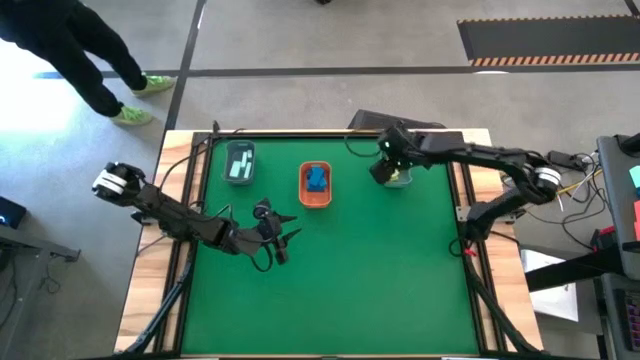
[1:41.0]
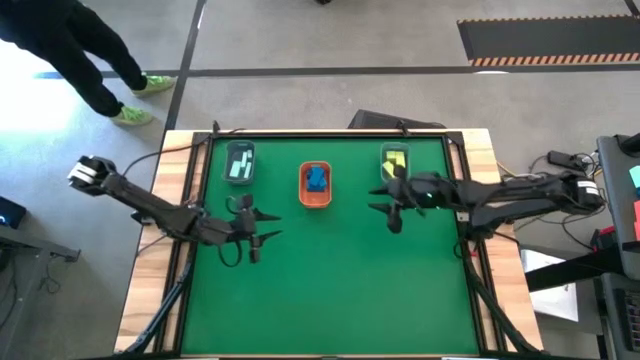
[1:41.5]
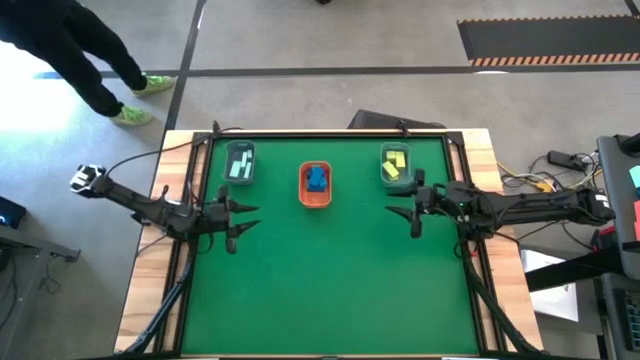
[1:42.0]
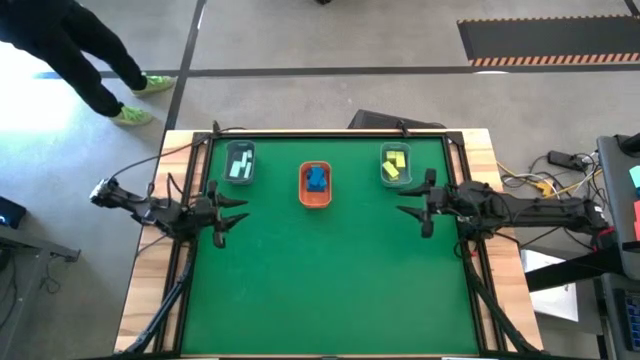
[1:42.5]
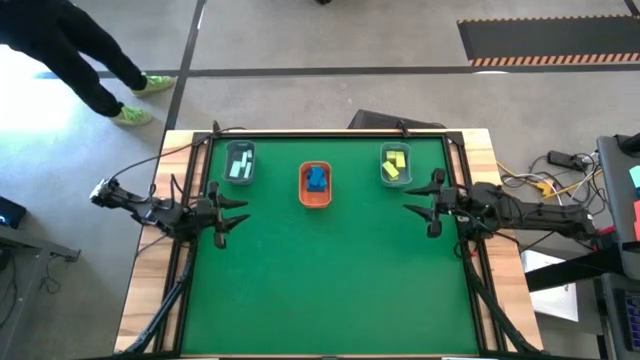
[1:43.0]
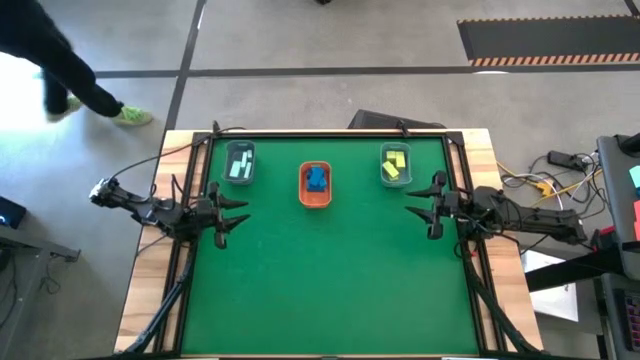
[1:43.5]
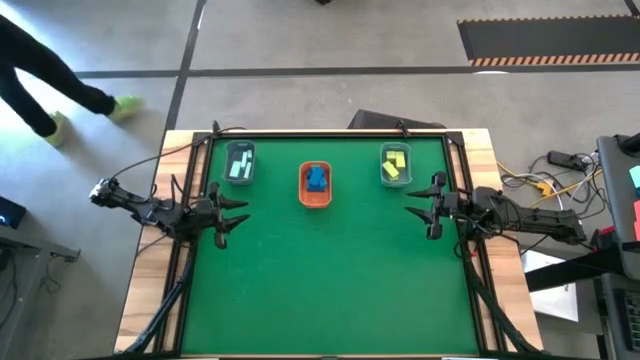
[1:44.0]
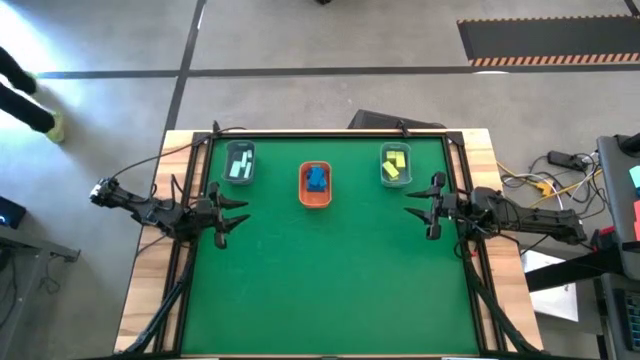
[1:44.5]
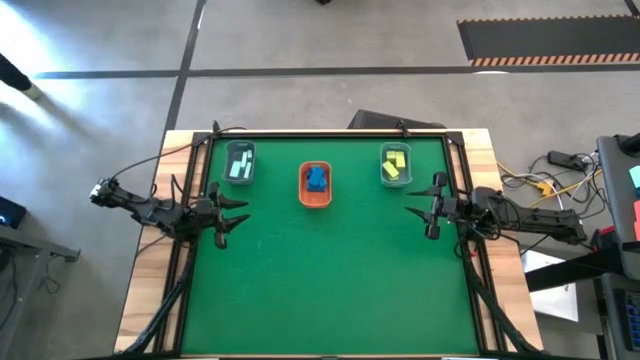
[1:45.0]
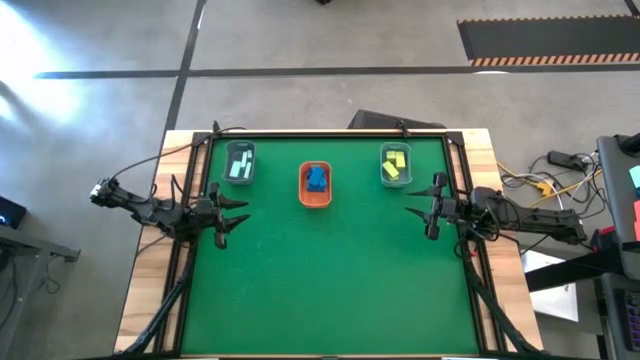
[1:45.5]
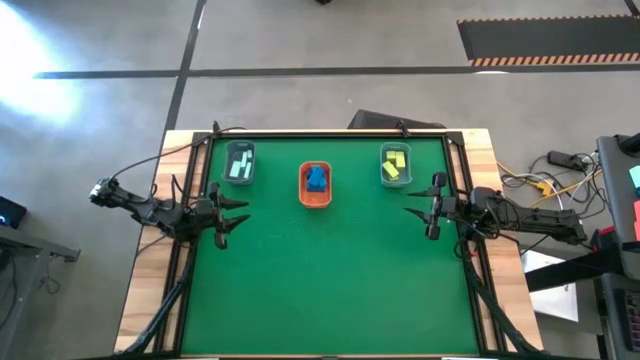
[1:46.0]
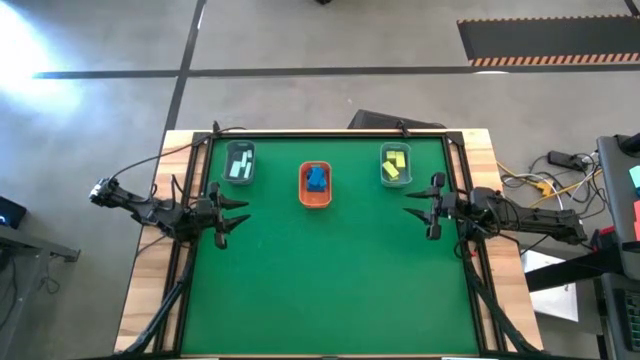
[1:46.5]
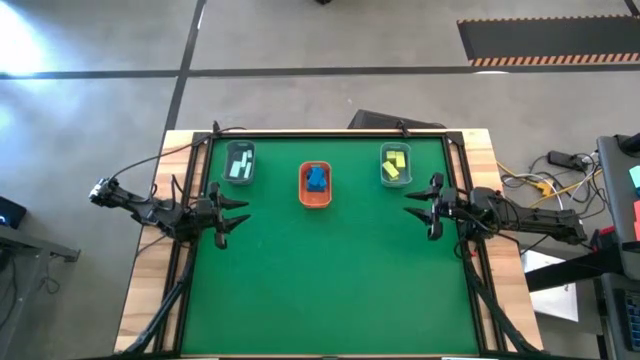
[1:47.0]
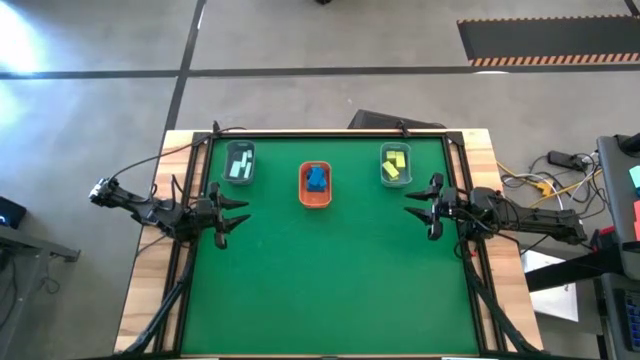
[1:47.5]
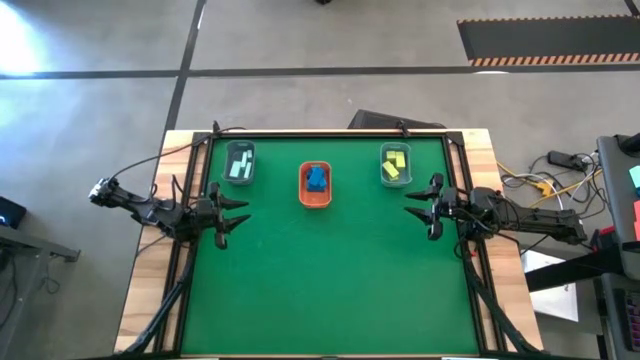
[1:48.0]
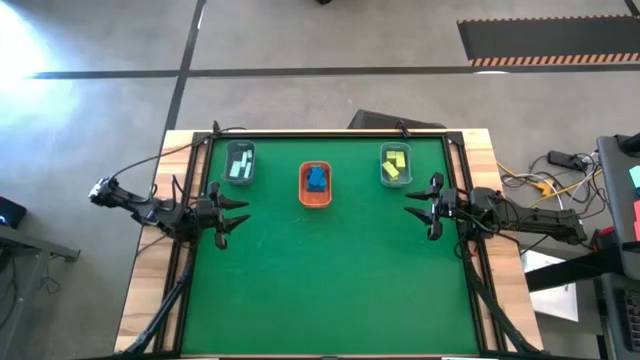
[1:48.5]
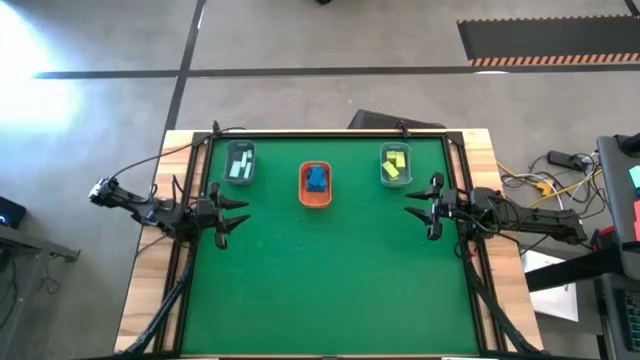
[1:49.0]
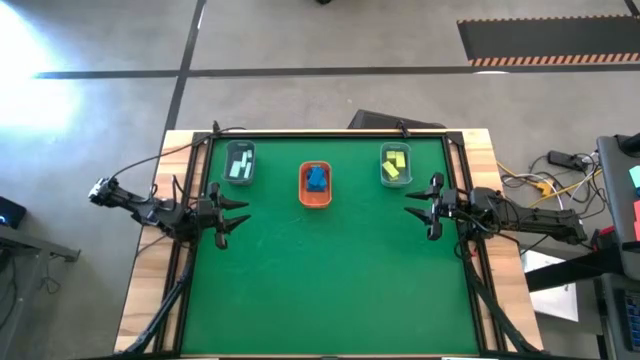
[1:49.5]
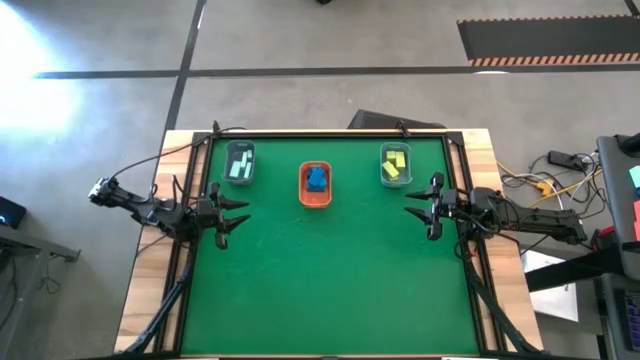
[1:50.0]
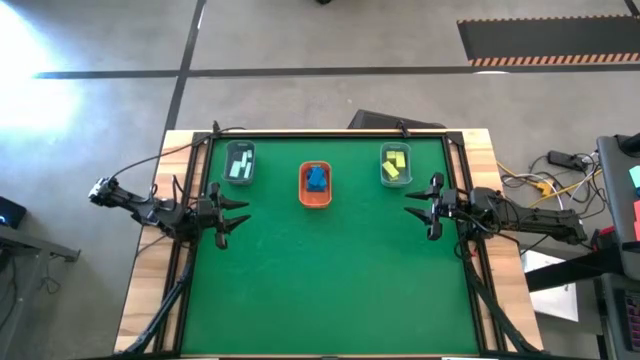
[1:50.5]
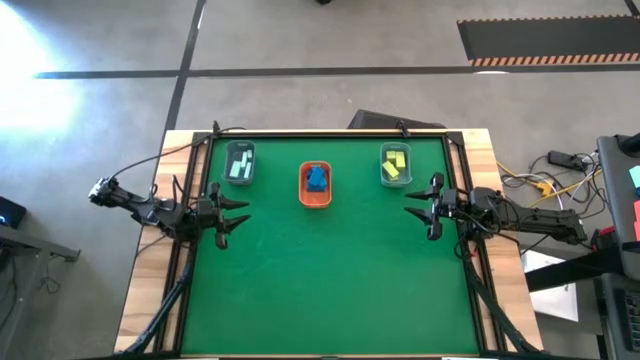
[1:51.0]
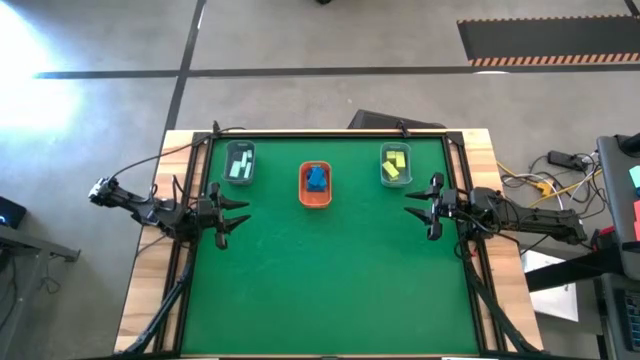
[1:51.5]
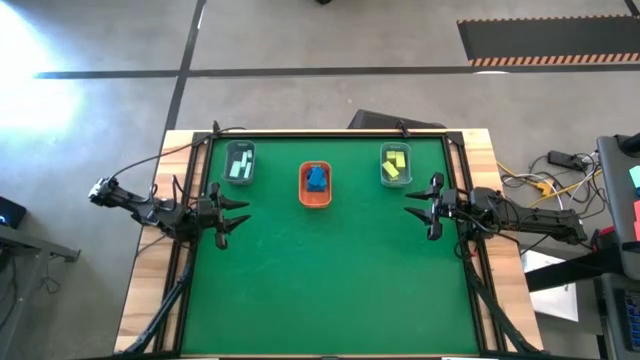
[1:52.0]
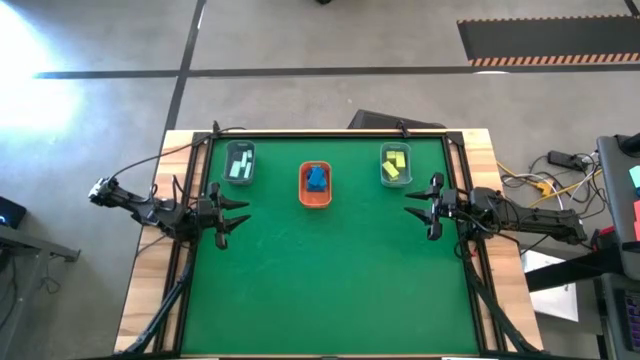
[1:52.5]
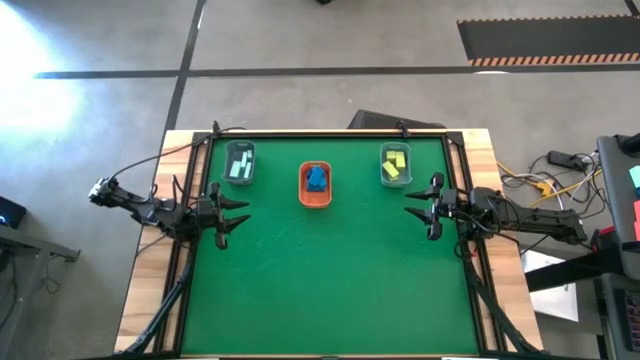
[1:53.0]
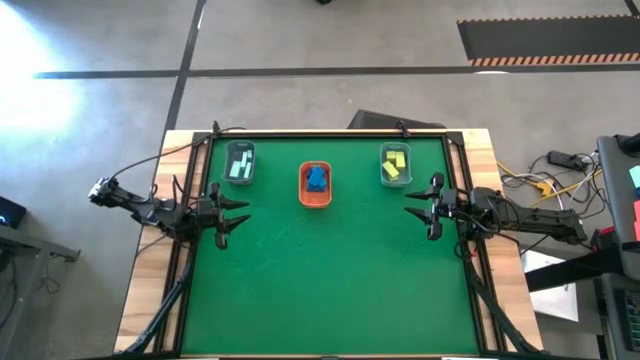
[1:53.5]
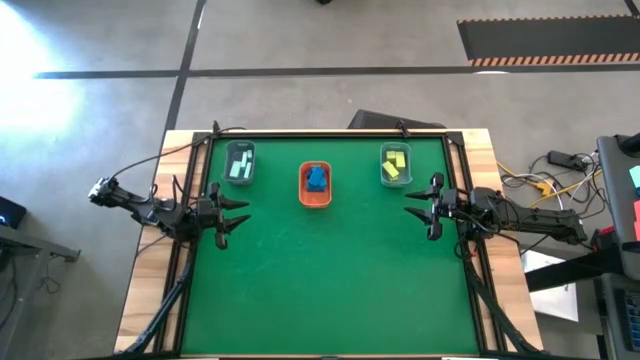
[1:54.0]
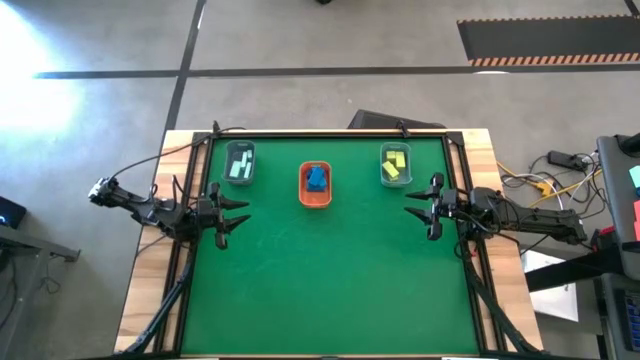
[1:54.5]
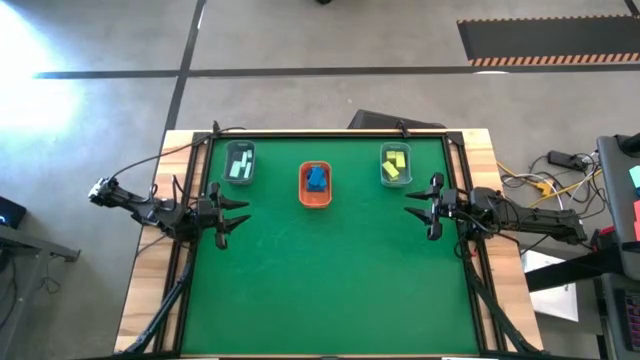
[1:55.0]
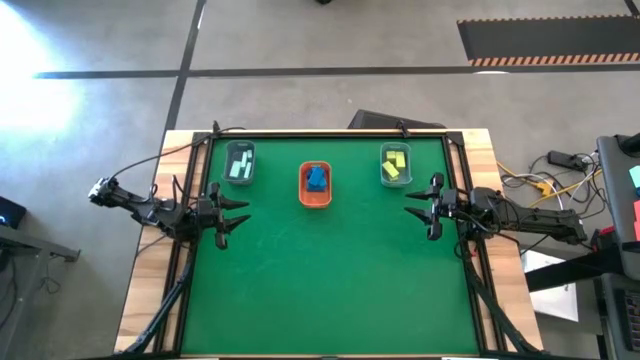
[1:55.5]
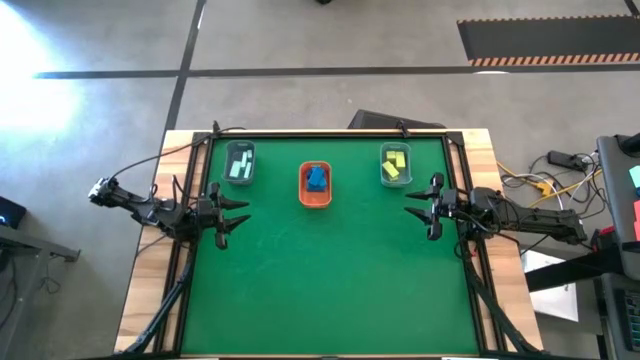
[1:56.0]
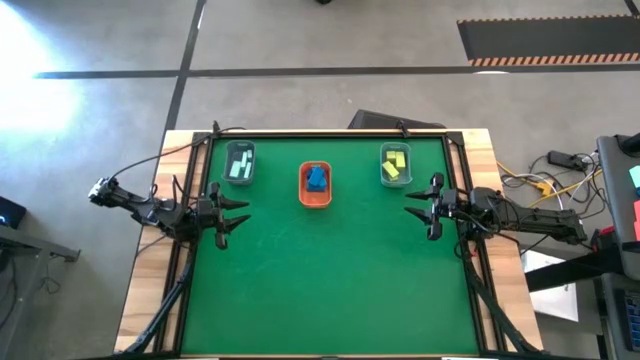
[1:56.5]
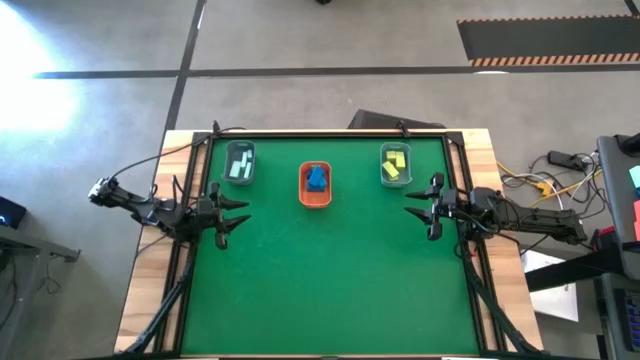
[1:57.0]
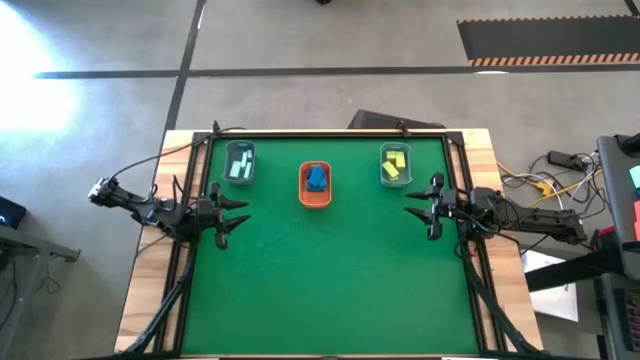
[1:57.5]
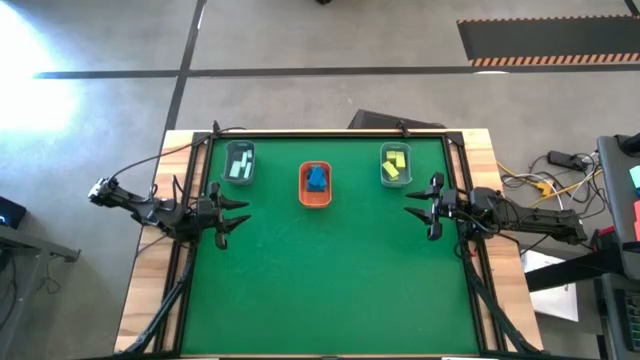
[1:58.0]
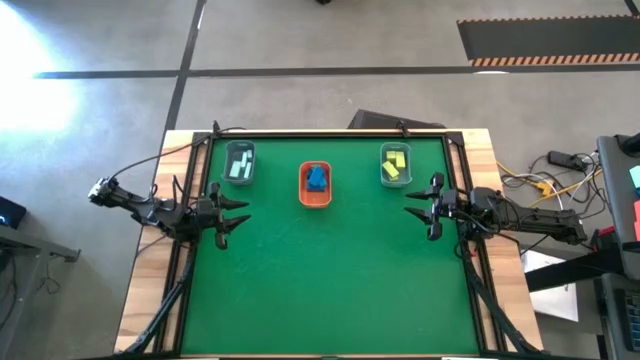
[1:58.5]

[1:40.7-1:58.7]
Task: Sort & place blocks by color
Return to Home Position

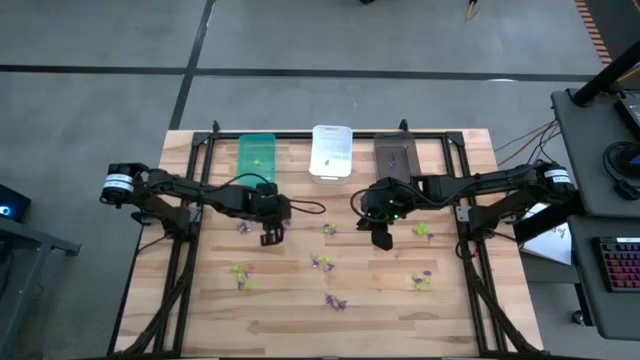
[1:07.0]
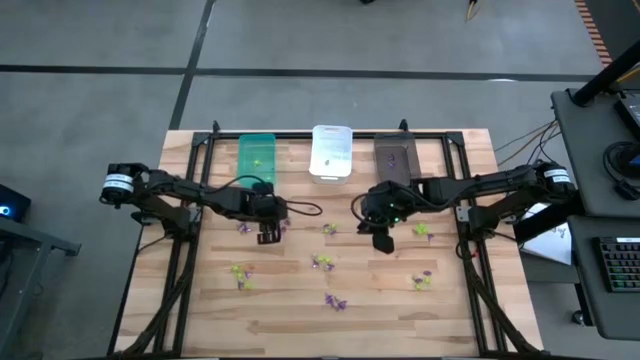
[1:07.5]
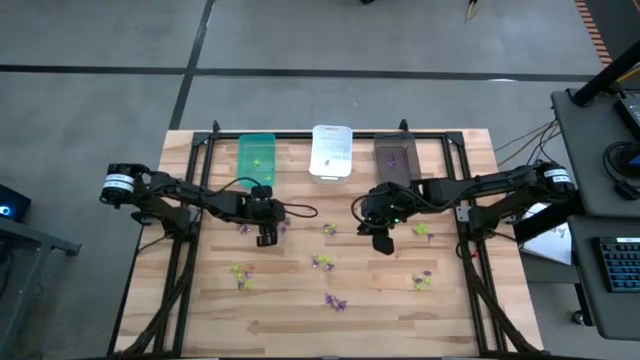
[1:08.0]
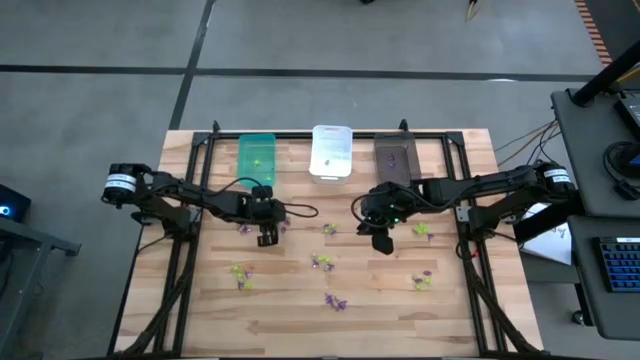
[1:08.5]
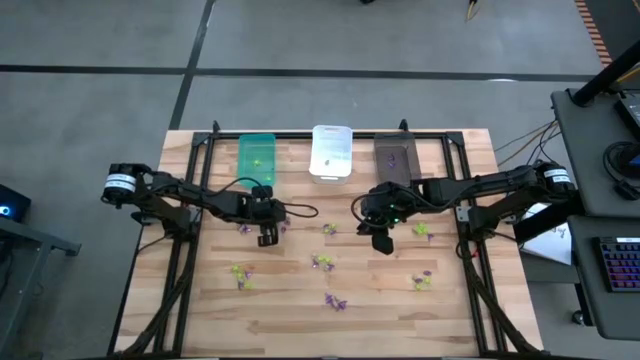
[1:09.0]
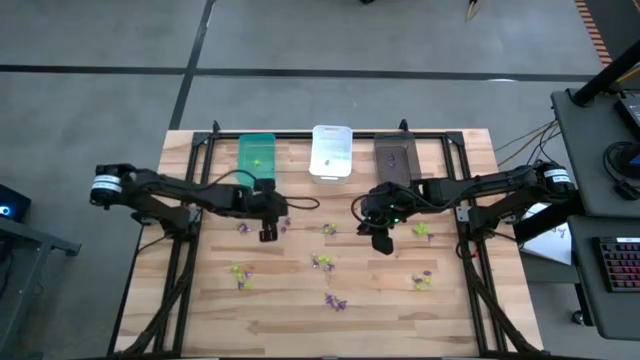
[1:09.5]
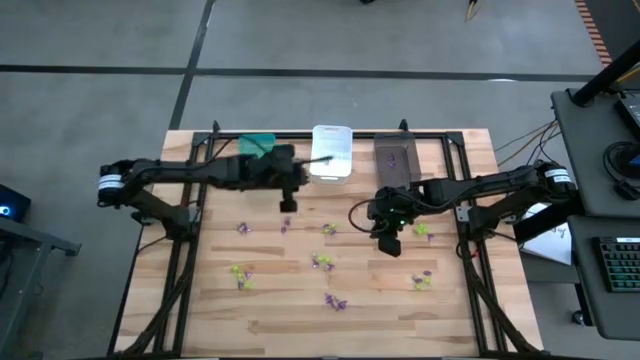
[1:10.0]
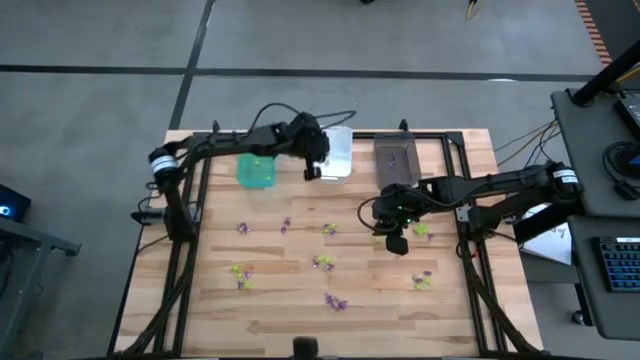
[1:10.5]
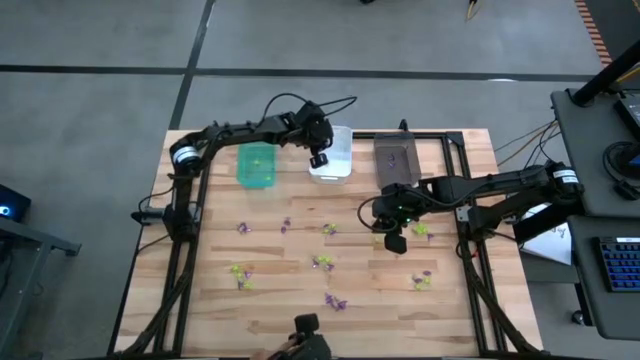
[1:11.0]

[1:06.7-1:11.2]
Task: Sort Halloween decoration
Put the white skull toy into the white bin
